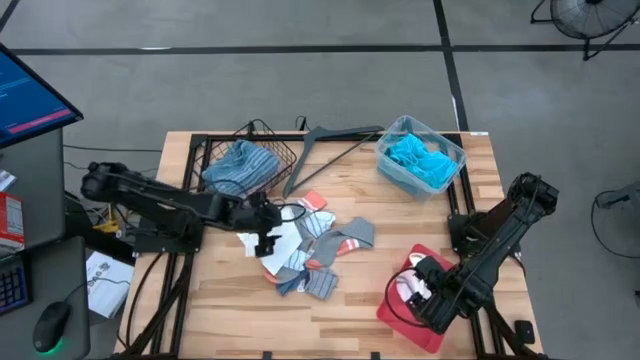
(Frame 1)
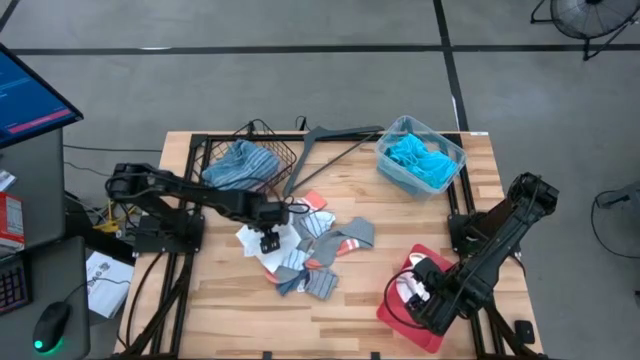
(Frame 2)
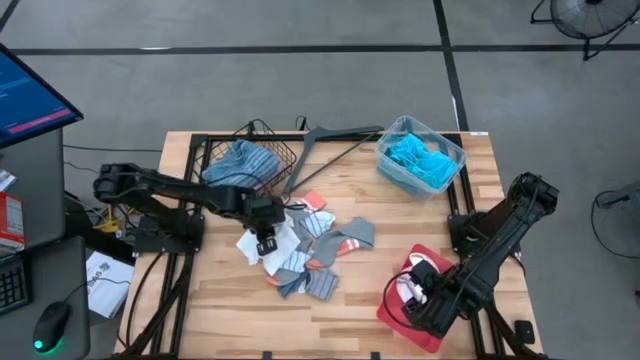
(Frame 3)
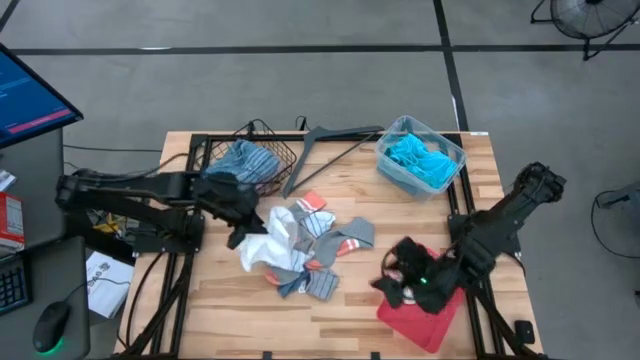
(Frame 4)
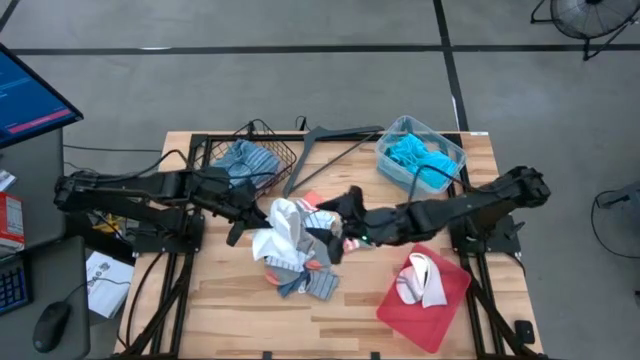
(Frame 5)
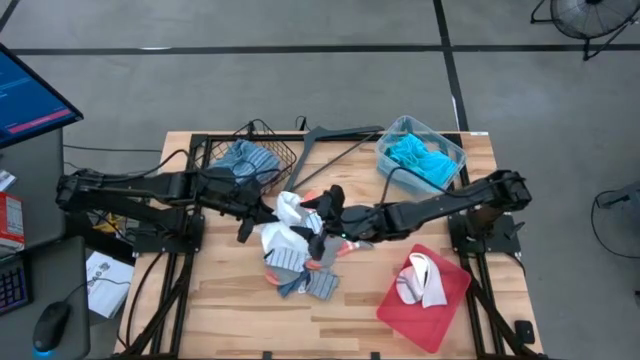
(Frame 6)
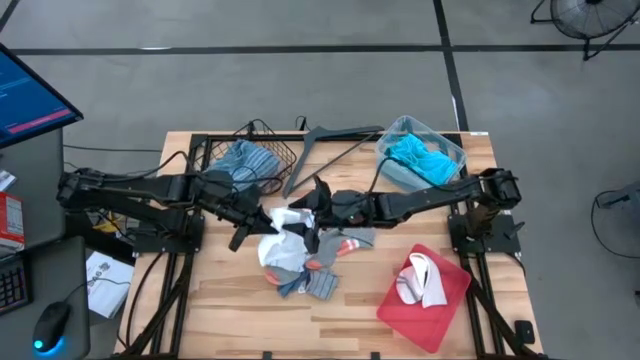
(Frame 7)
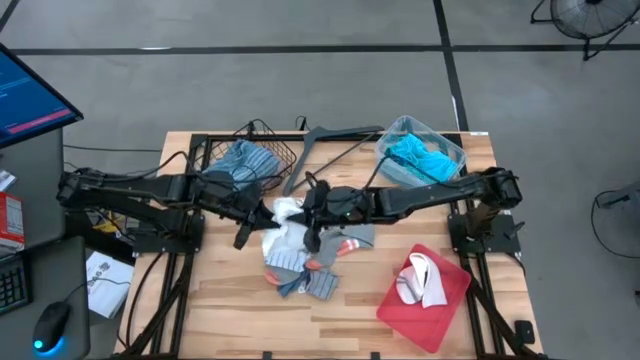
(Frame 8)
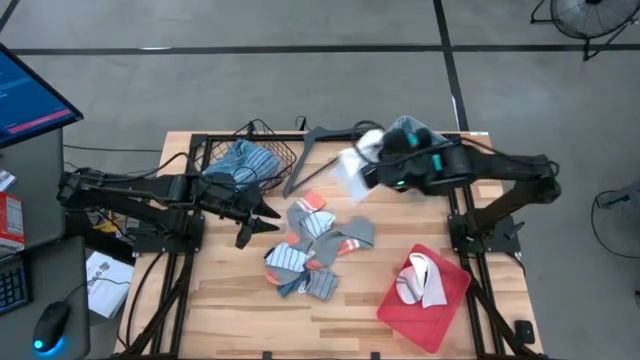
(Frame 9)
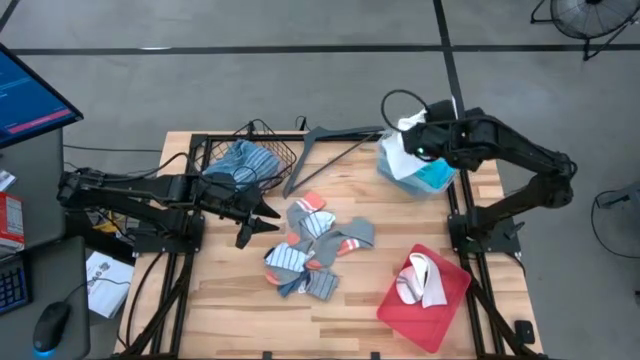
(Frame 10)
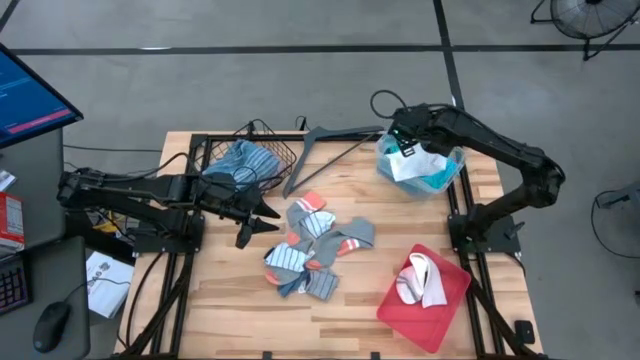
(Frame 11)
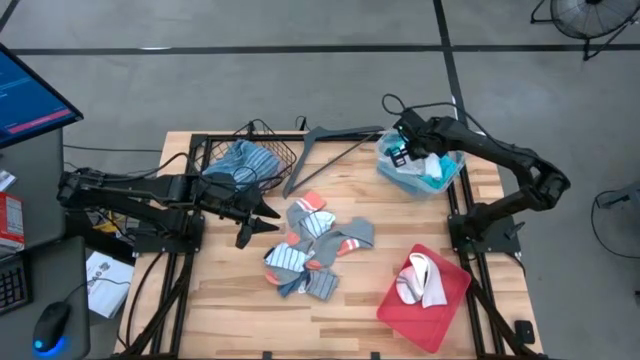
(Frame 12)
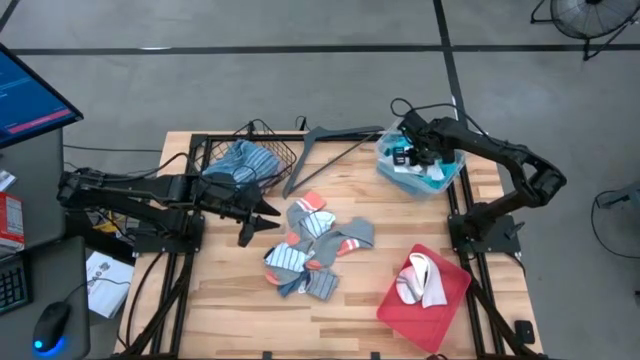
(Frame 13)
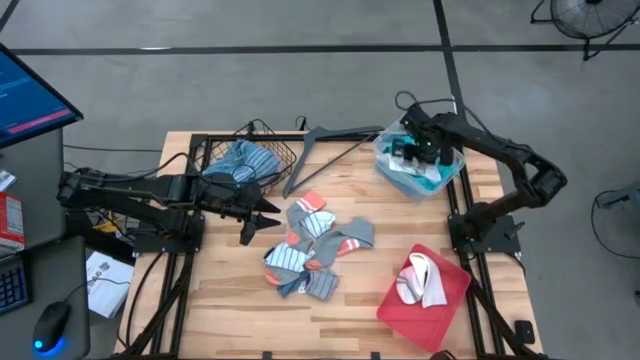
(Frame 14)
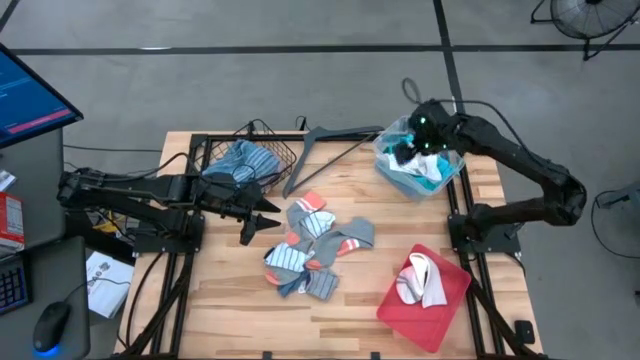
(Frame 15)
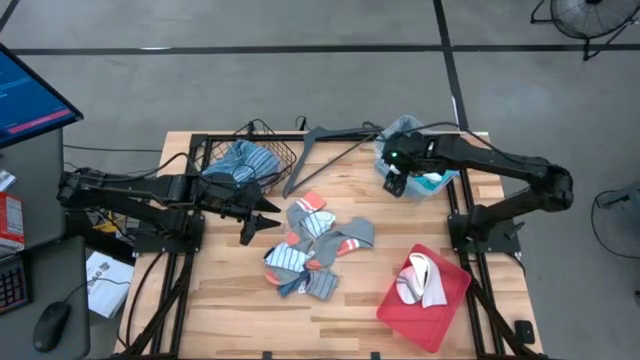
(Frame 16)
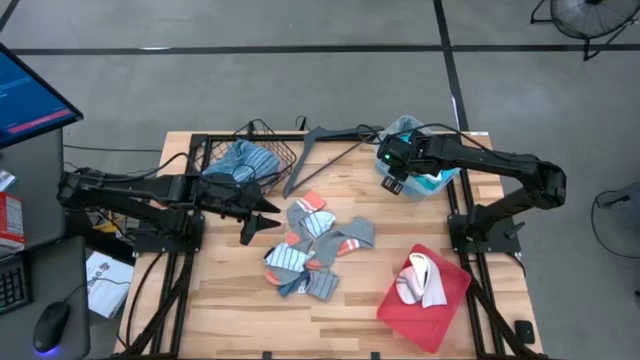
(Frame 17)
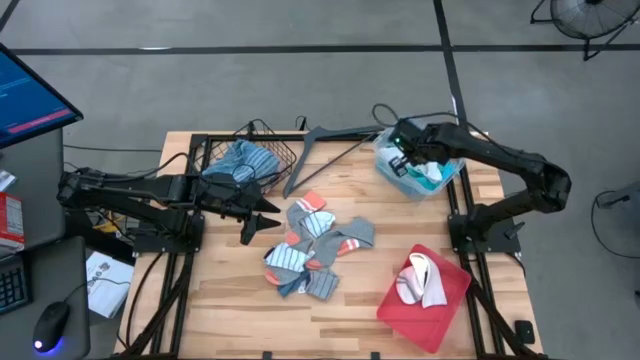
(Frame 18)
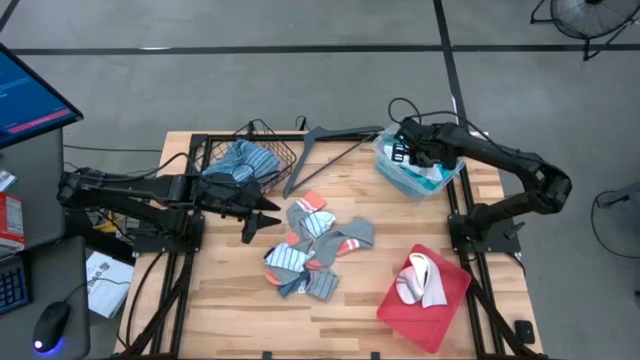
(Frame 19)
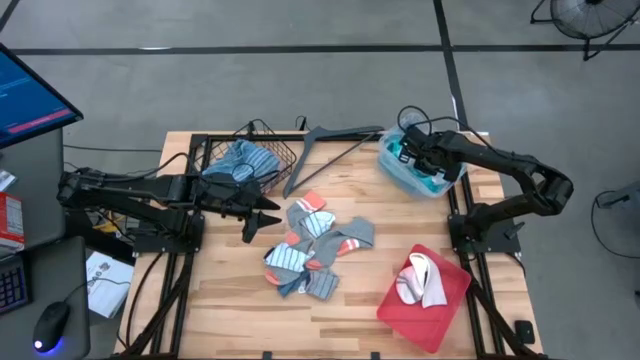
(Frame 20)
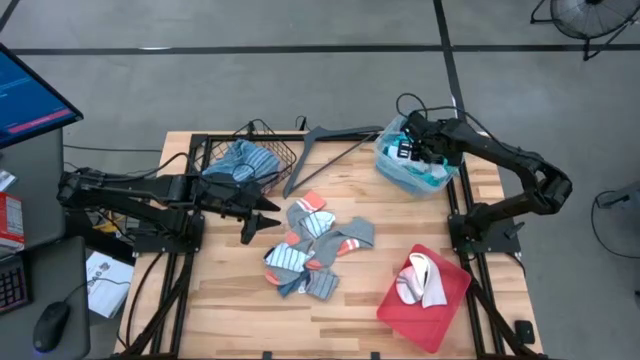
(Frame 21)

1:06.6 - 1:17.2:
Task: Pick & Place Cloths
Put the white shorts into the transparent bin

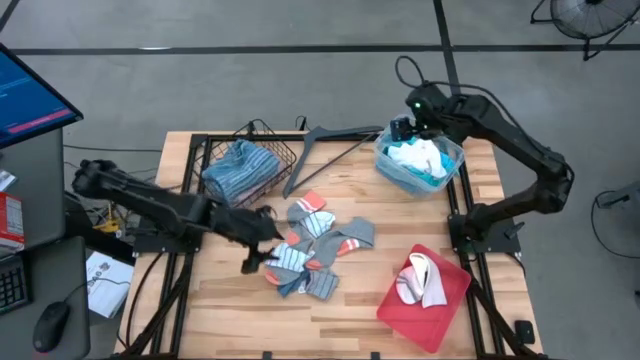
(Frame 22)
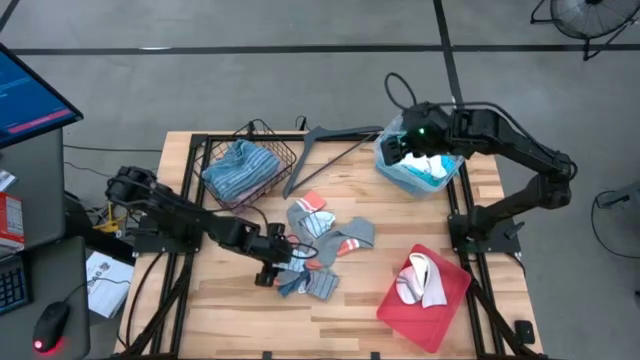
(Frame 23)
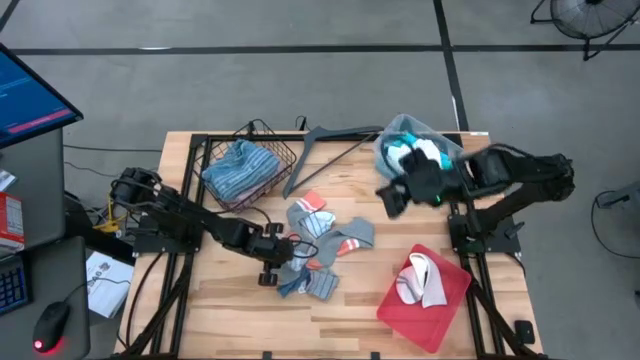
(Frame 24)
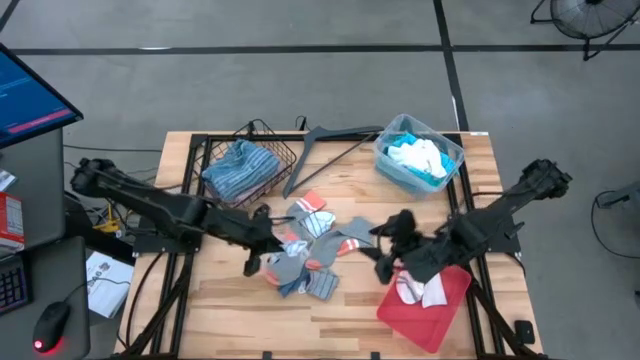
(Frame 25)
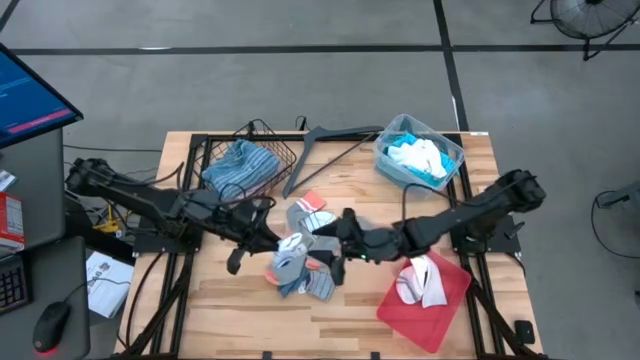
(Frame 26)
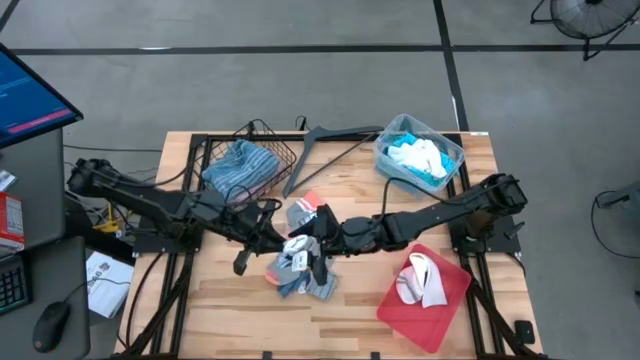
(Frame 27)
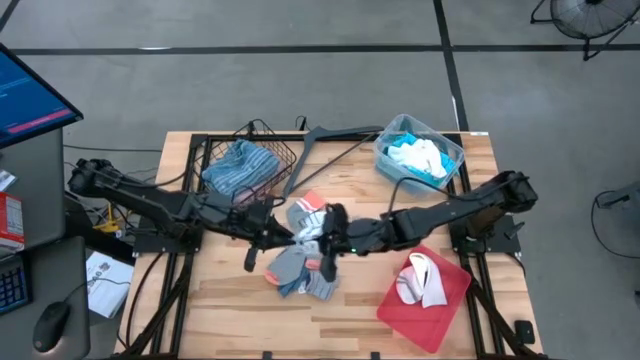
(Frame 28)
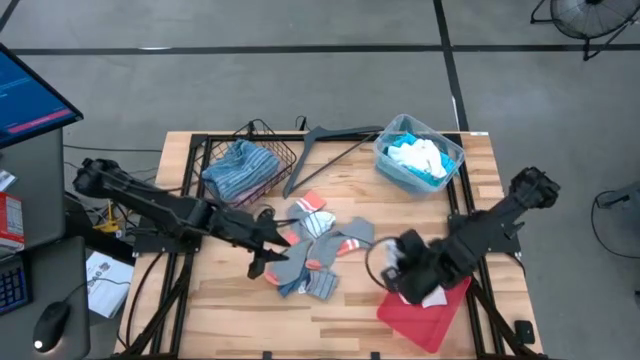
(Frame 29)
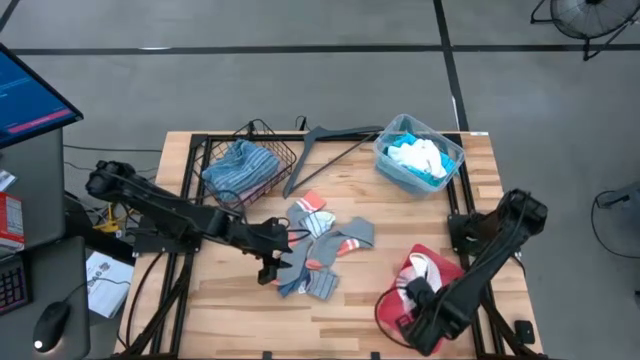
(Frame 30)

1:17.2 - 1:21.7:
Put the bottom white patterned sock into the red bin
